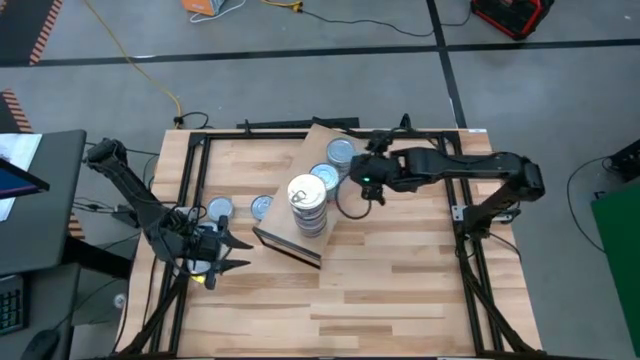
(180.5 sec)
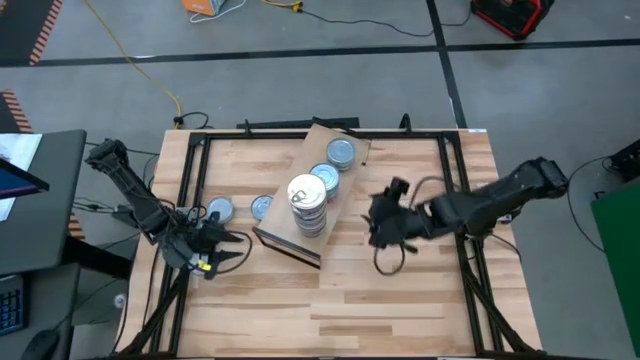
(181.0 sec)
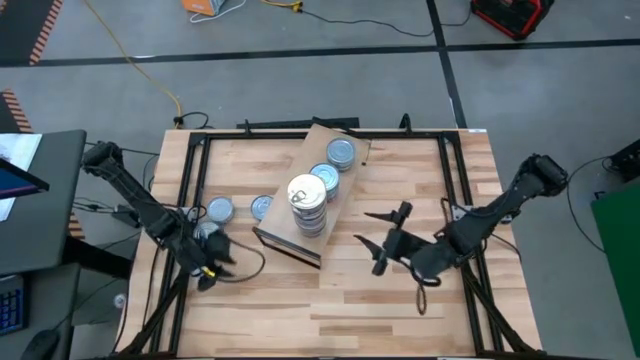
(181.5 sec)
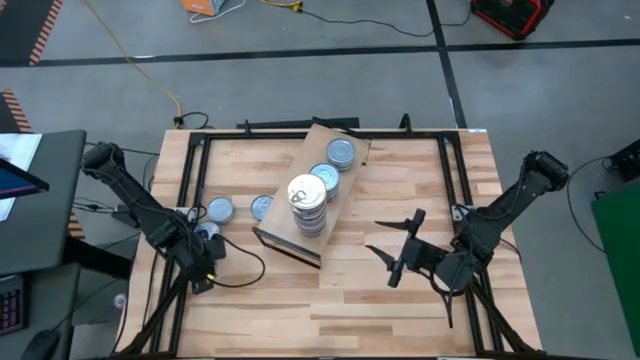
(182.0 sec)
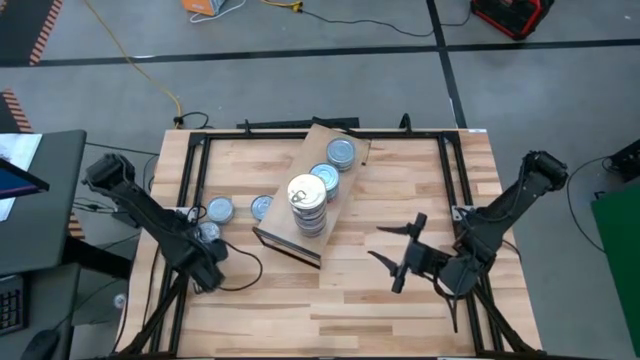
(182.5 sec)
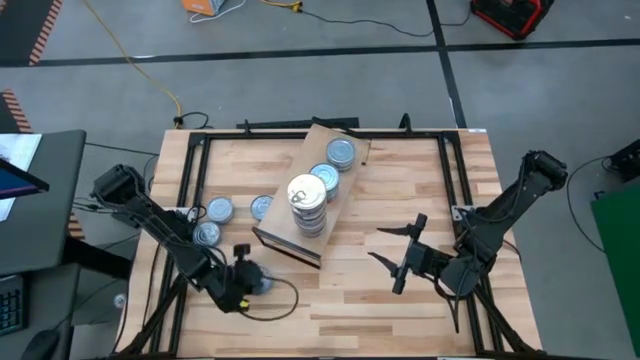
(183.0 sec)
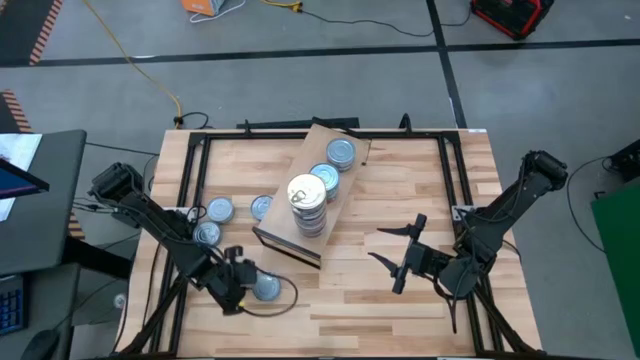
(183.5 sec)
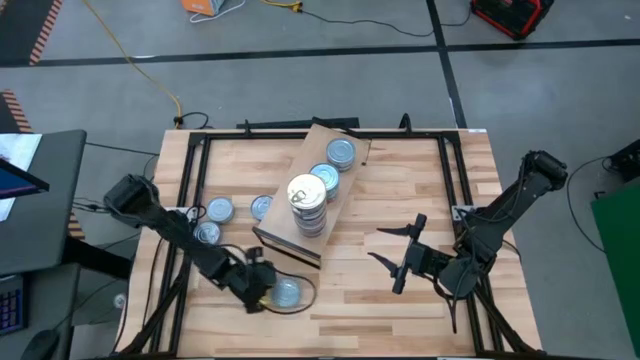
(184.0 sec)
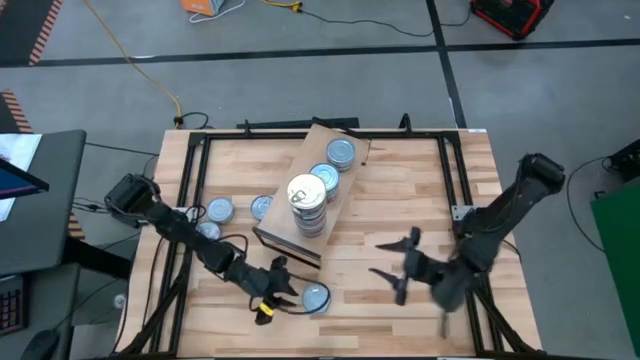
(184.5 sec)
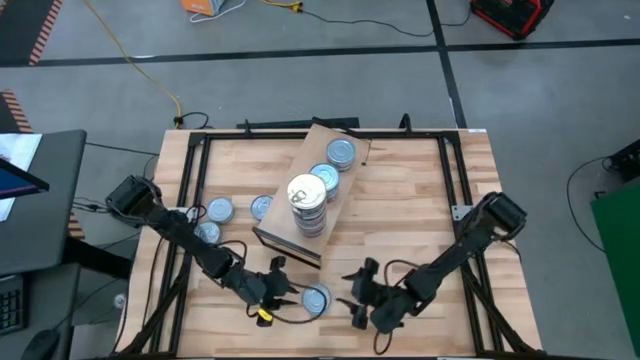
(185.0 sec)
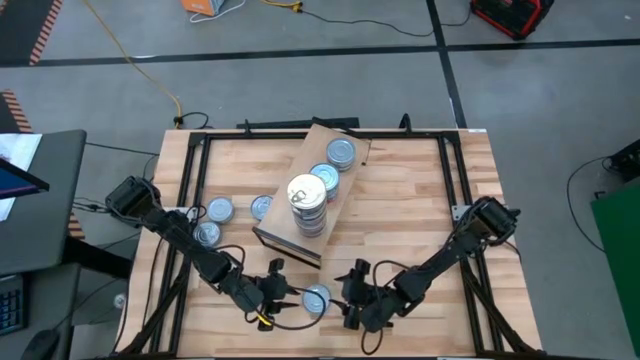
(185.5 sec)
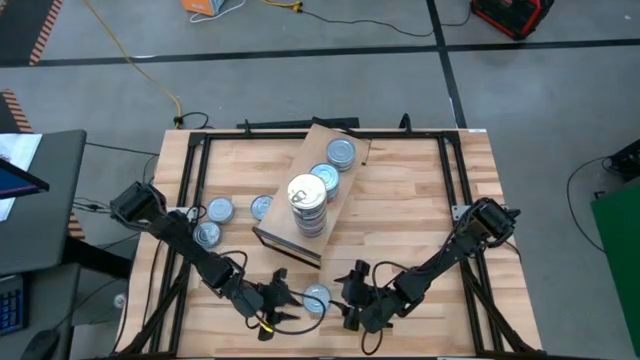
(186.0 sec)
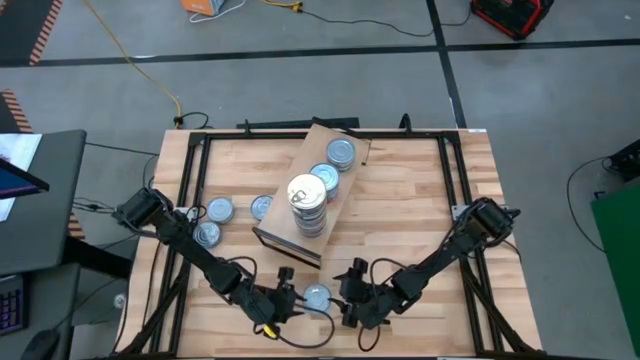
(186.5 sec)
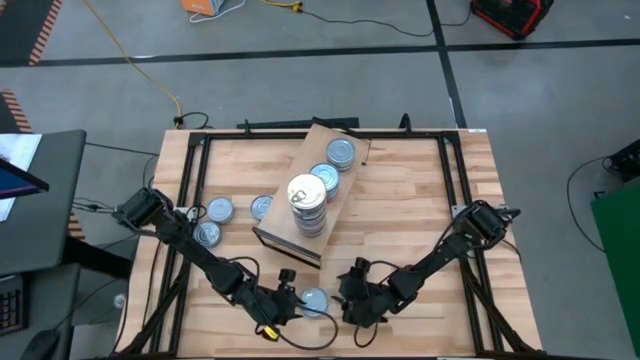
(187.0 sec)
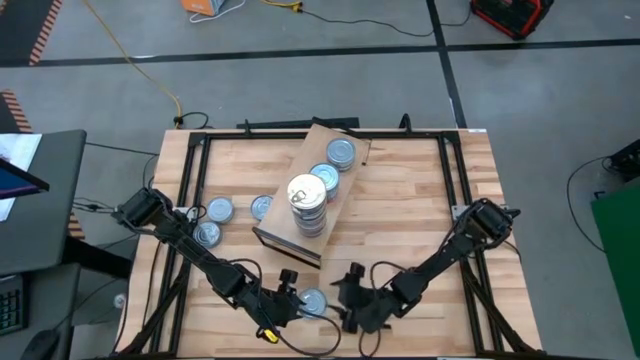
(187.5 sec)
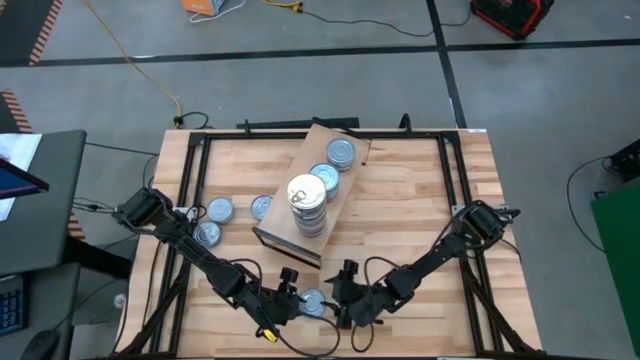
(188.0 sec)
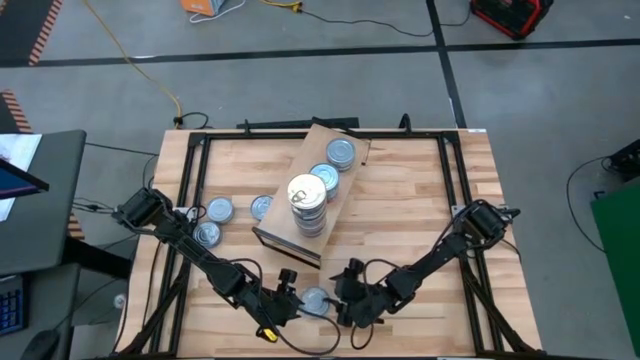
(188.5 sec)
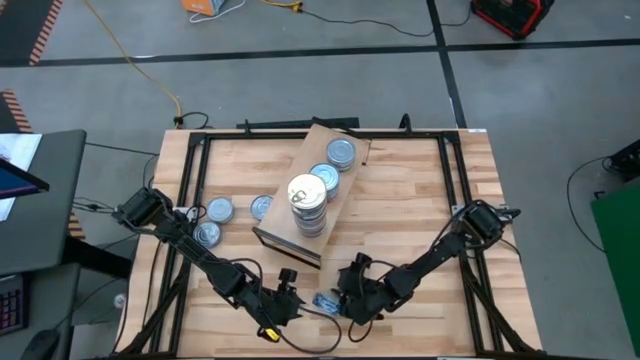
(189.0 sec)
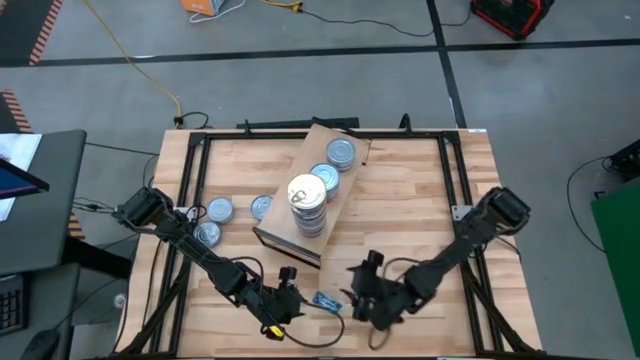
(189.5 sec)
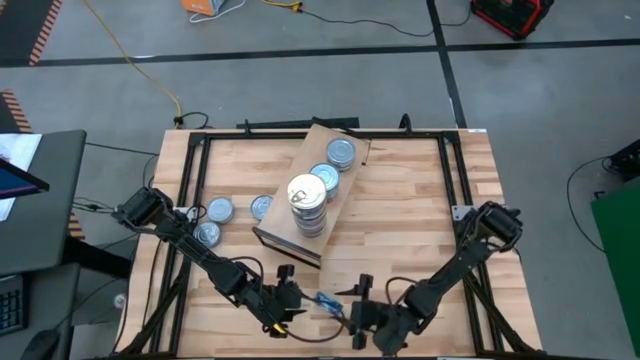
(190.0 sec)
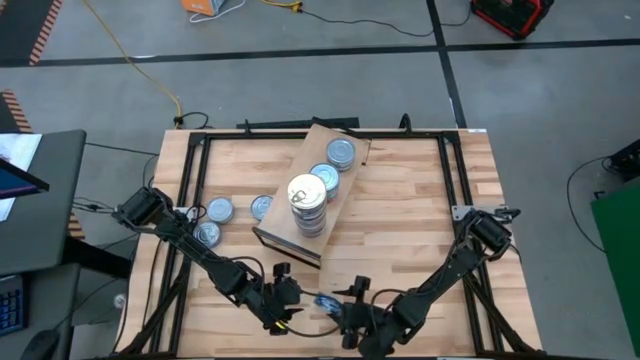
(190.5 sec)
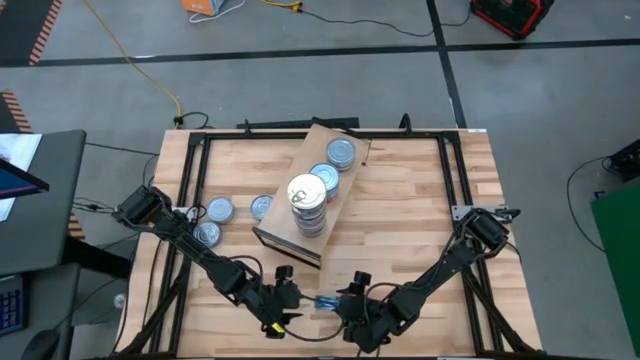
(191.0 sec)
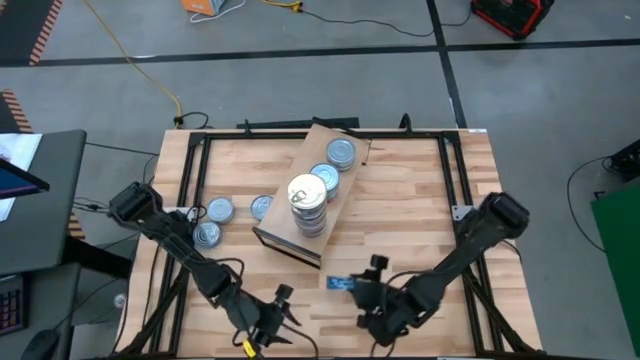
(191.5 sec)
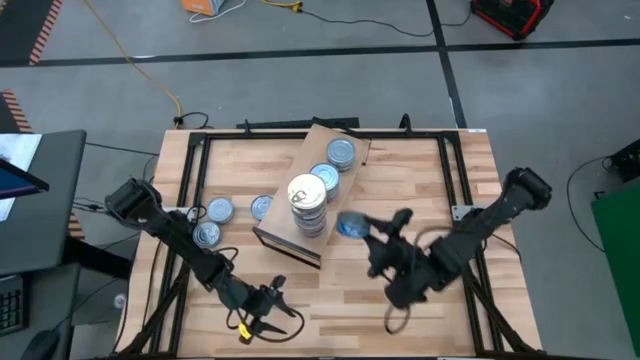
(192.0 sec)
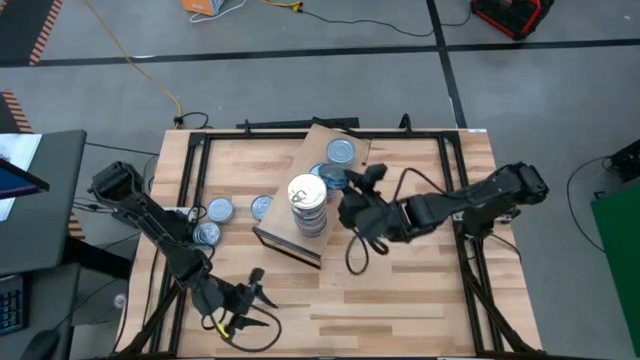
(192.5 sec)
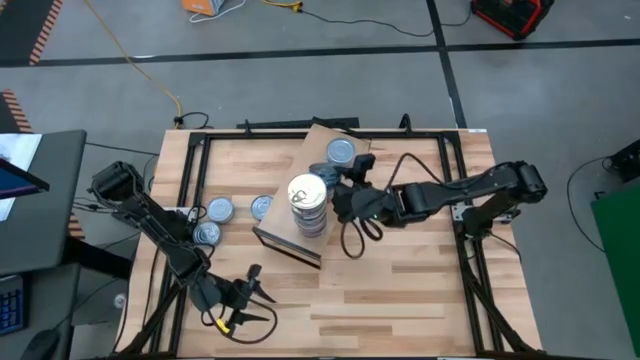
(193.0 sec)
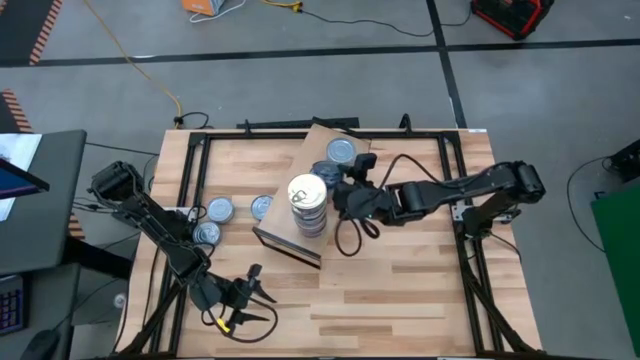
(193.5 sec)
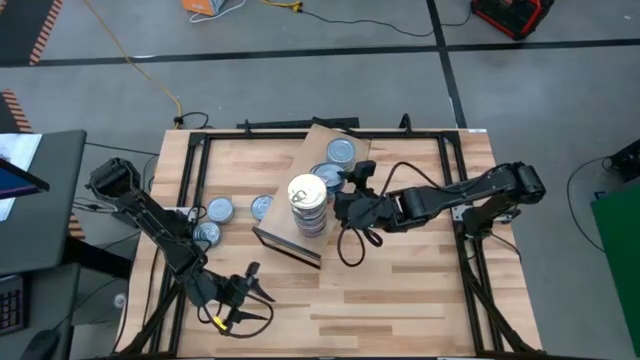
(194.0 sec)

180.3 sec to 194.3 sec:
Task: Stack canned seafood by type on shelf
Stack the blue tuna can on top of the green tuna can on the shelf

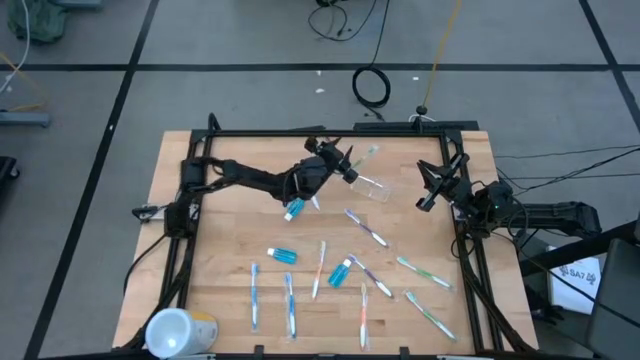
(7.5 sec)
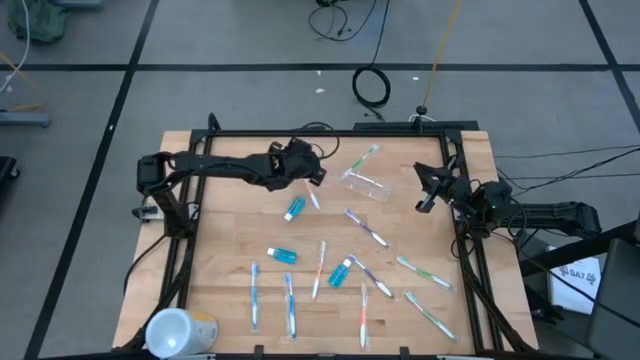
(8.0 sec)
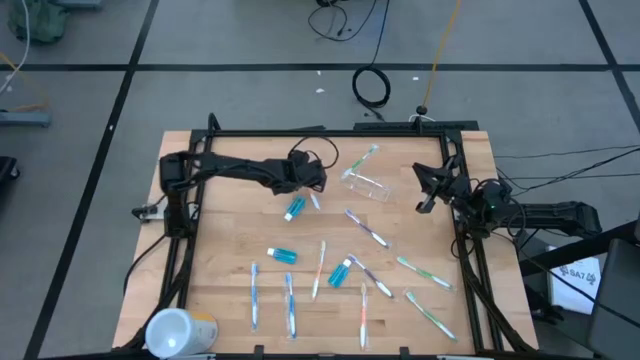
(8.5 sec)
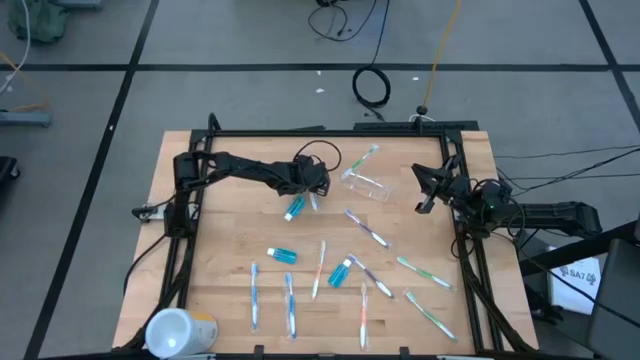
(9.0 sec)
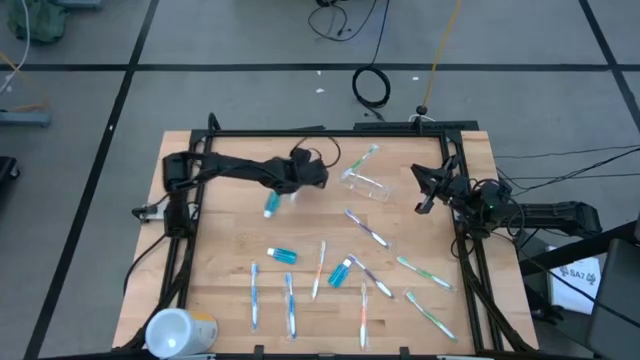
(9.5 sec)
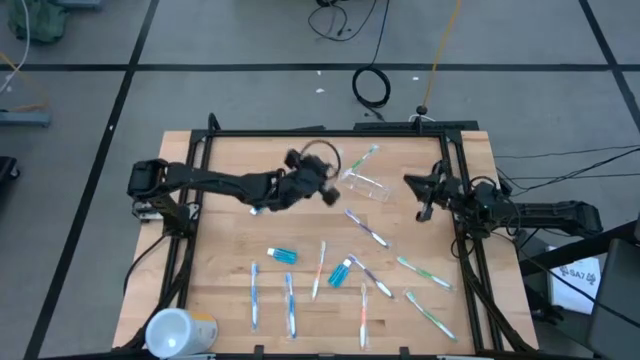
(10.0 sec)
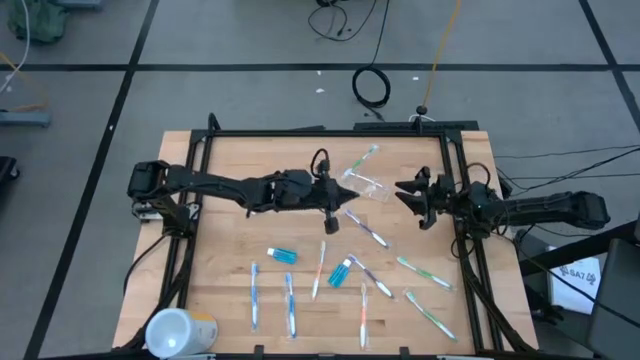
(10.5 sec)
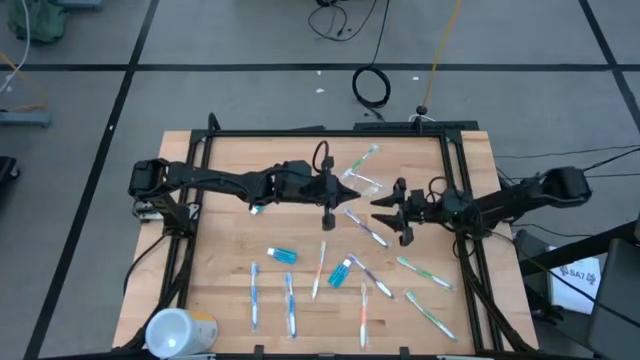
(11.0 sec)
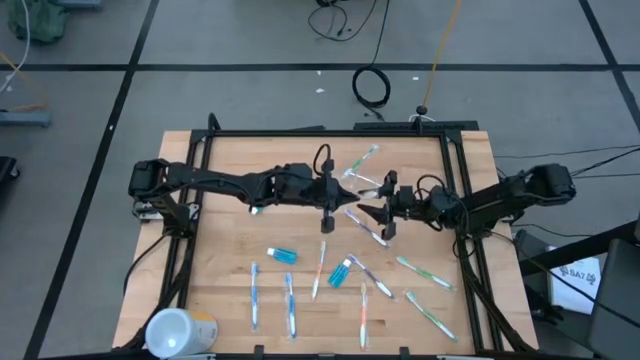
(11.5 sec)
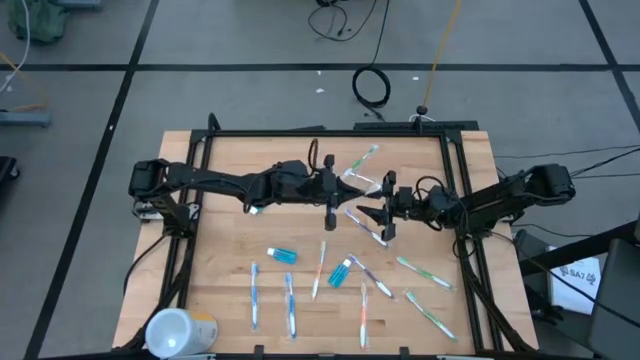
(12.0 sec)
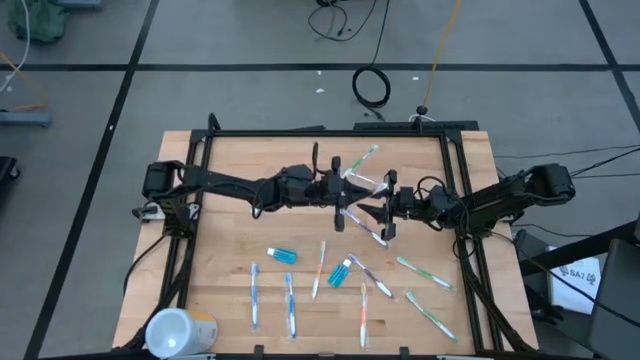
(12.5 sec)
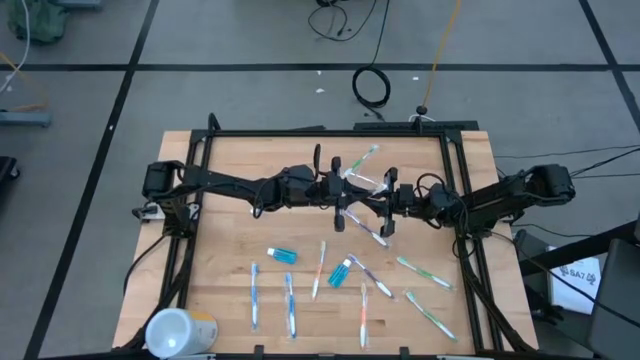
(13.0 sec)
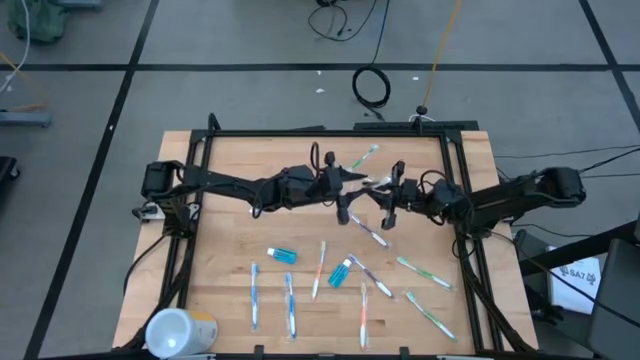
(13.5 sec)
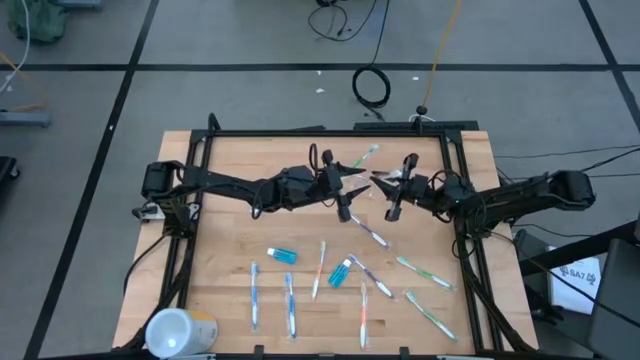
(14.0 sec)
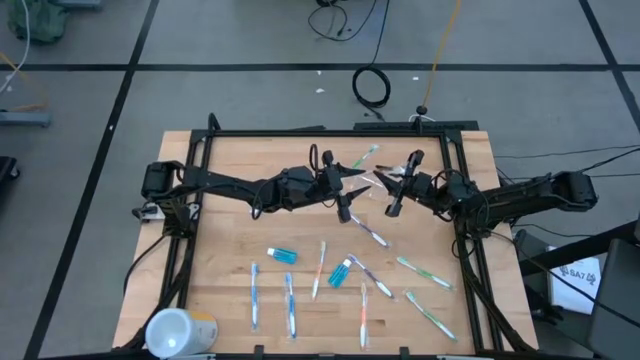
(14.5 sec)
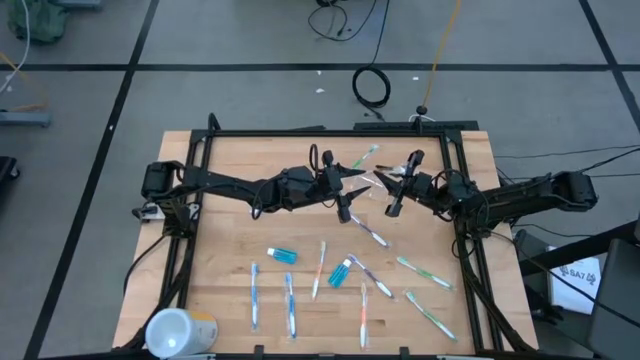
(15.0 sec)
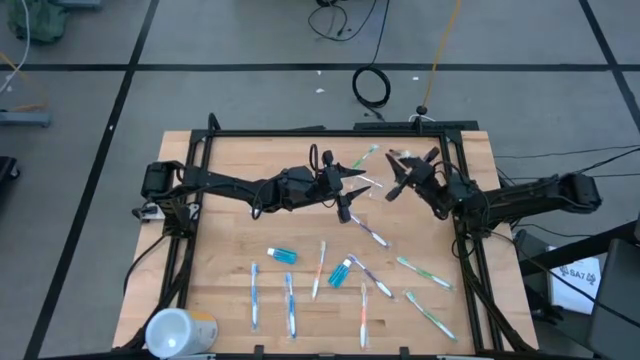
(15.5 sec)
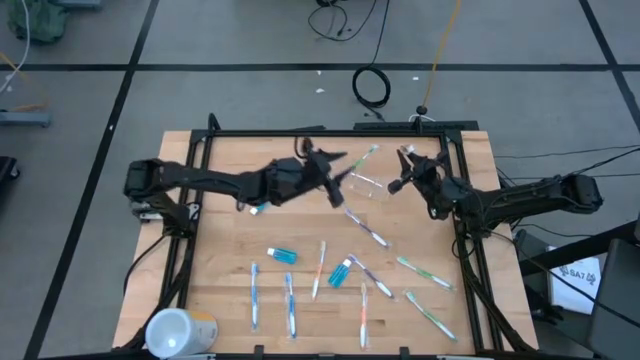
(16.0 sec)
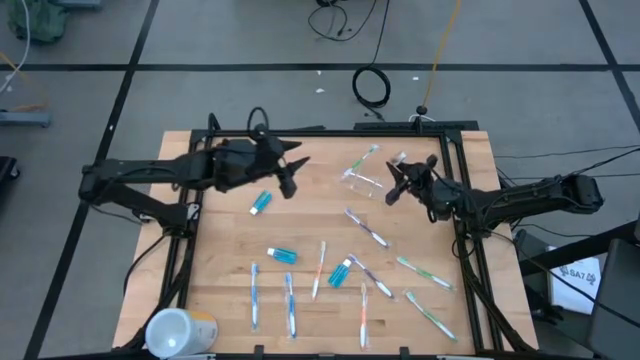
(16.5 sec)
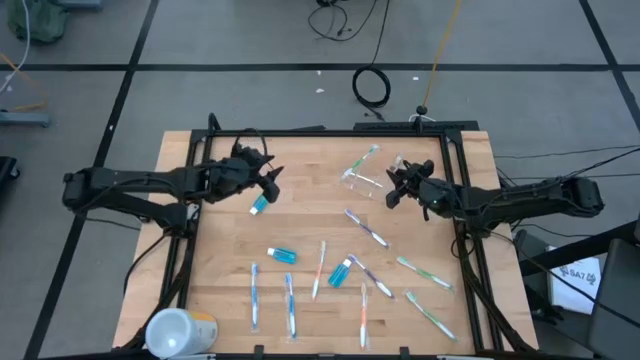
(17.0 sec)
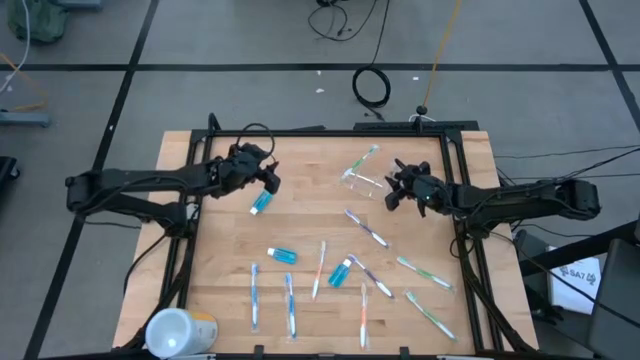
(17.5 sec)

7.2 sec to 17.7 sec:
Task: Pick & Place toothbrushing station
Put the top orange toothbrush into the transparent organizer
